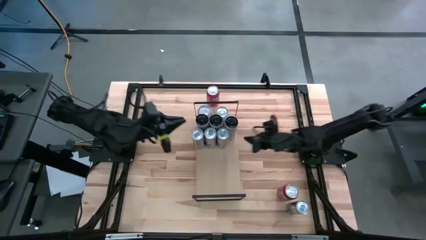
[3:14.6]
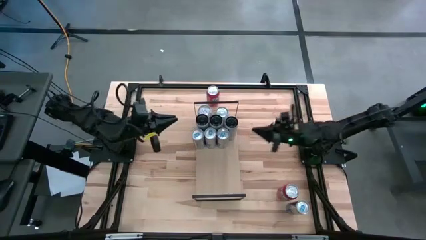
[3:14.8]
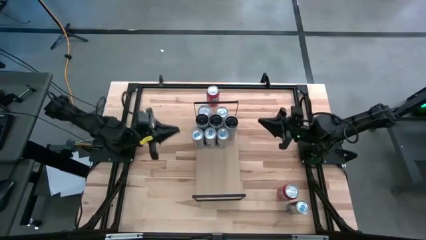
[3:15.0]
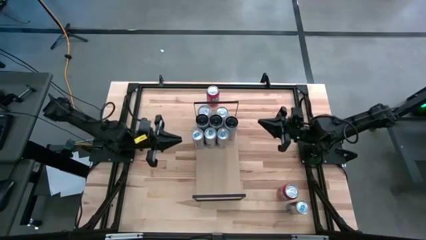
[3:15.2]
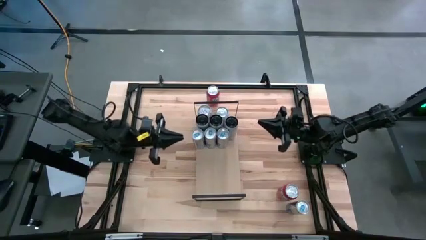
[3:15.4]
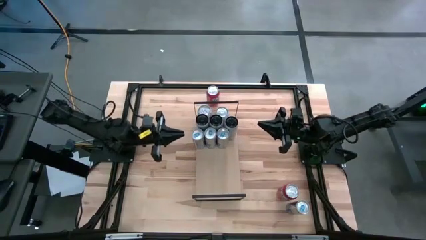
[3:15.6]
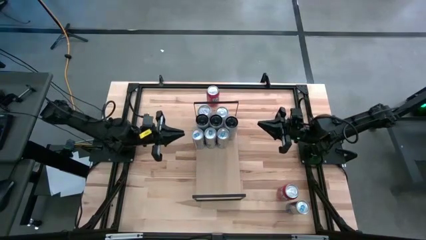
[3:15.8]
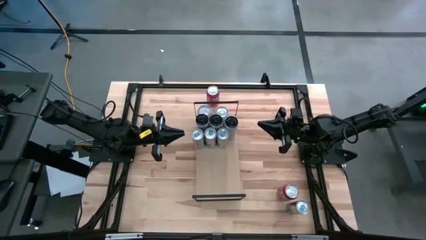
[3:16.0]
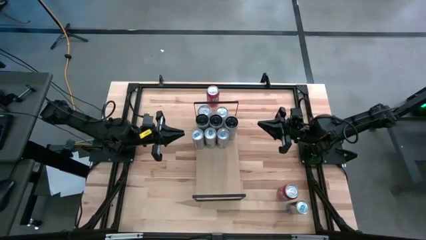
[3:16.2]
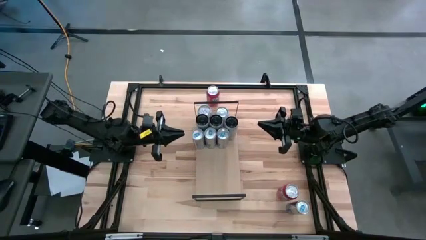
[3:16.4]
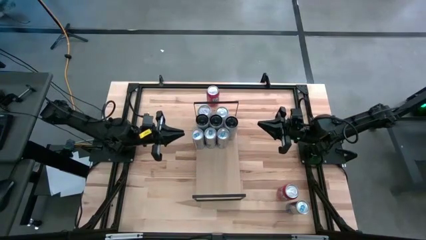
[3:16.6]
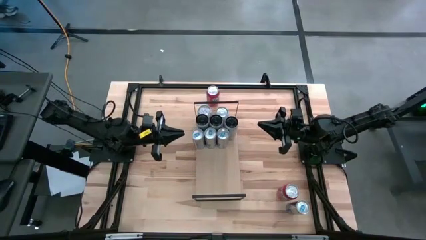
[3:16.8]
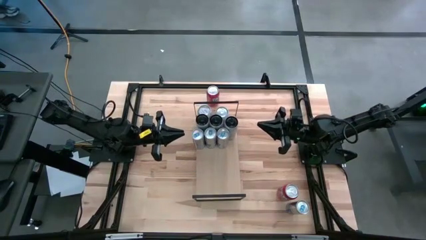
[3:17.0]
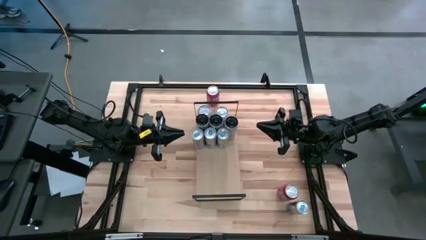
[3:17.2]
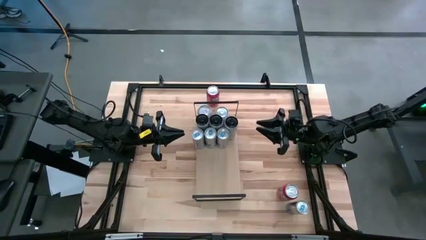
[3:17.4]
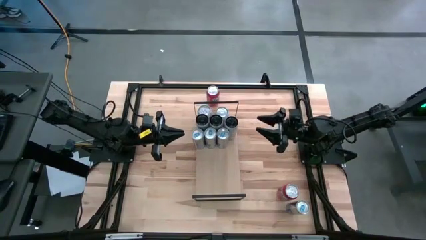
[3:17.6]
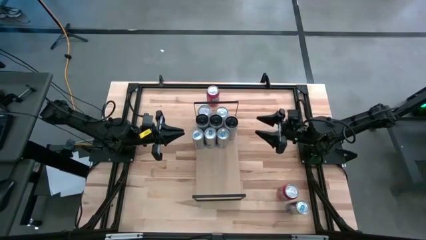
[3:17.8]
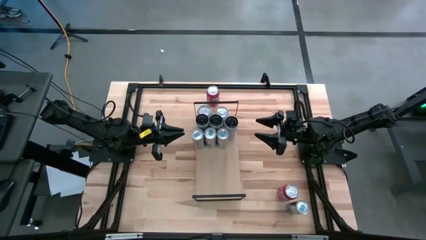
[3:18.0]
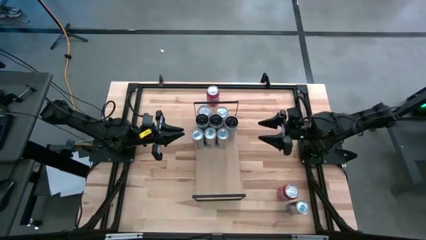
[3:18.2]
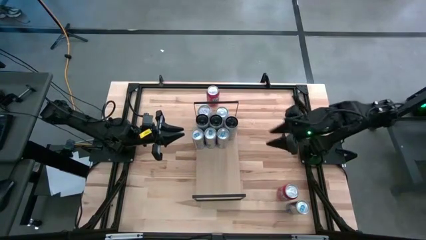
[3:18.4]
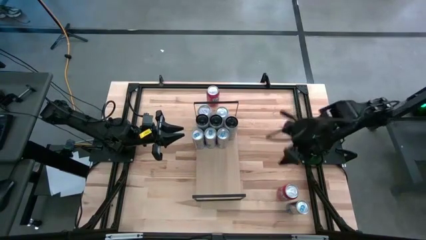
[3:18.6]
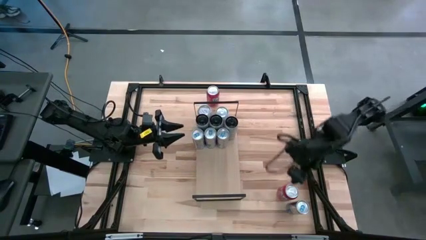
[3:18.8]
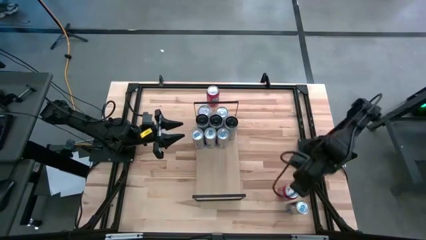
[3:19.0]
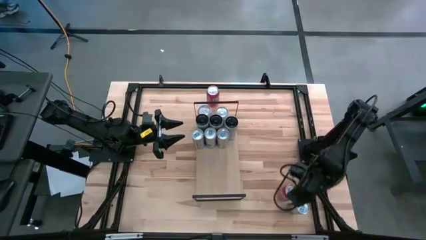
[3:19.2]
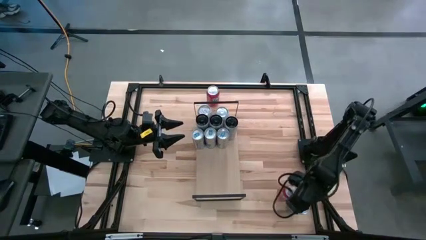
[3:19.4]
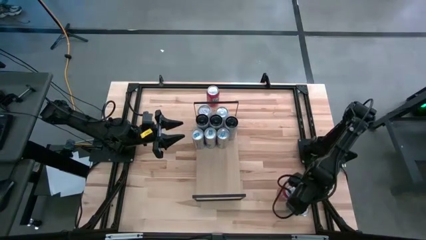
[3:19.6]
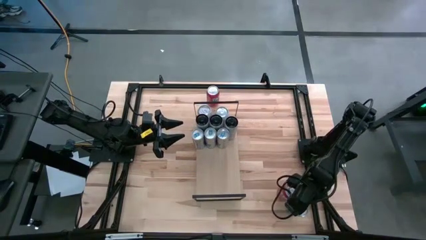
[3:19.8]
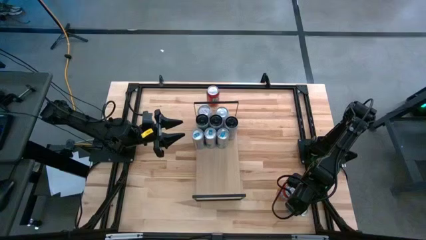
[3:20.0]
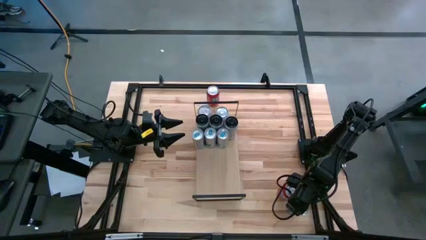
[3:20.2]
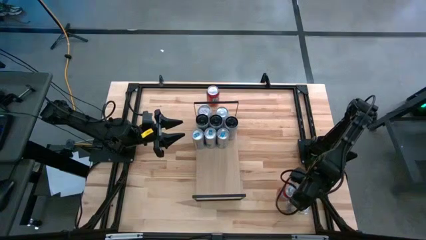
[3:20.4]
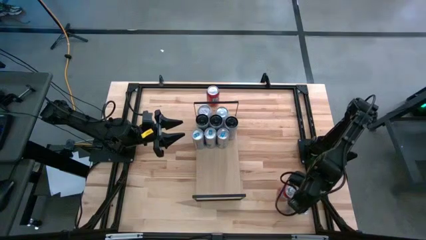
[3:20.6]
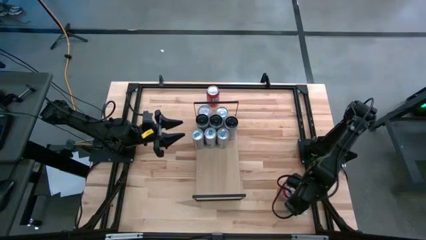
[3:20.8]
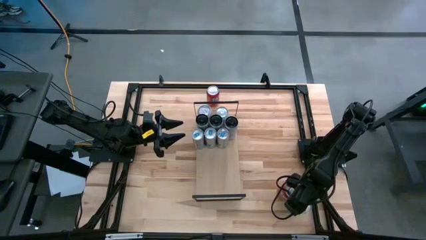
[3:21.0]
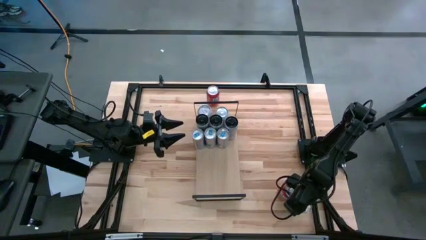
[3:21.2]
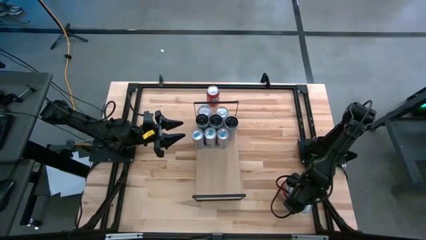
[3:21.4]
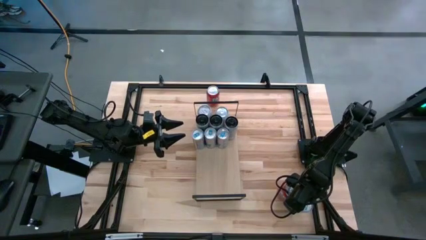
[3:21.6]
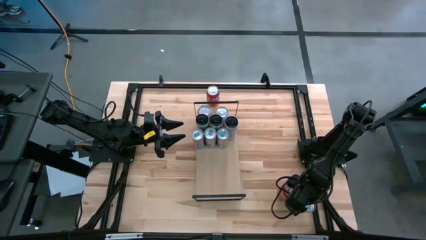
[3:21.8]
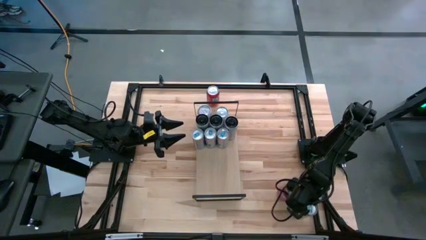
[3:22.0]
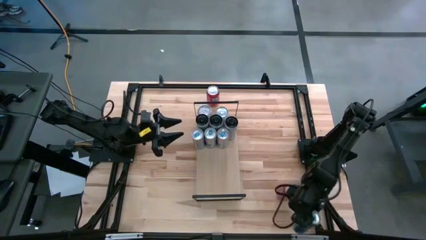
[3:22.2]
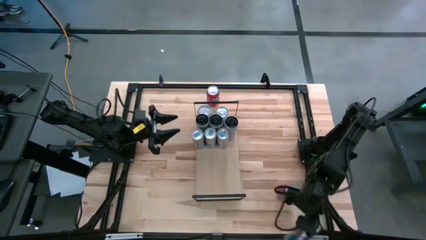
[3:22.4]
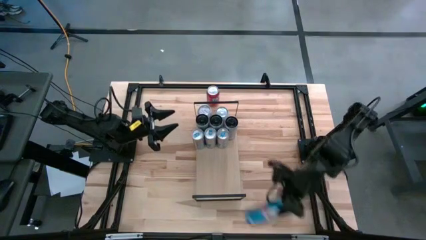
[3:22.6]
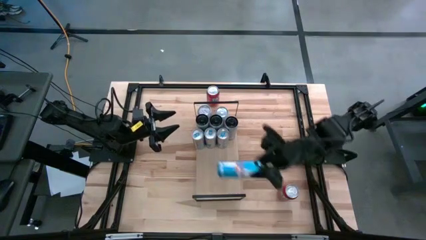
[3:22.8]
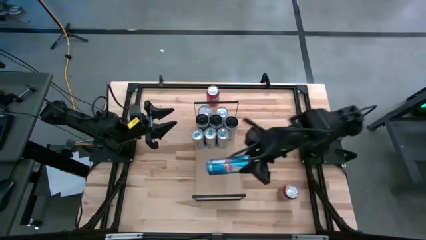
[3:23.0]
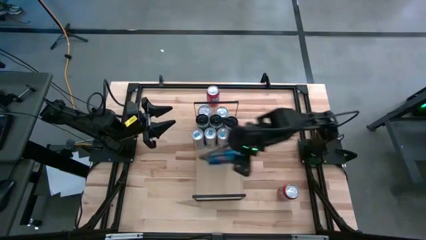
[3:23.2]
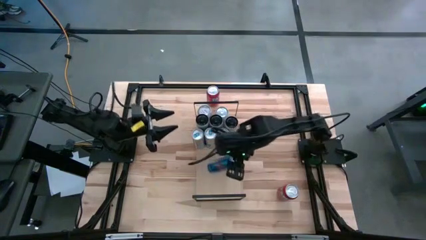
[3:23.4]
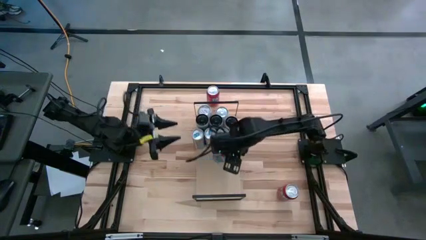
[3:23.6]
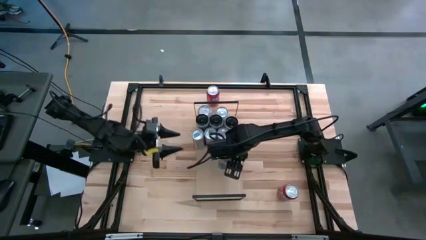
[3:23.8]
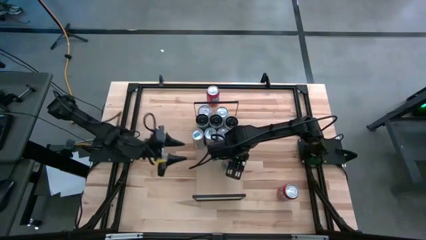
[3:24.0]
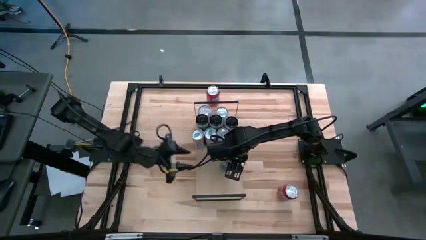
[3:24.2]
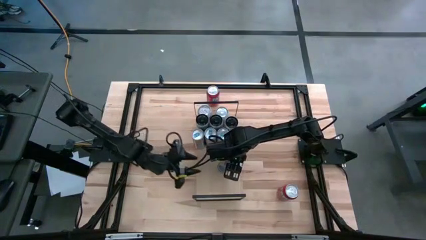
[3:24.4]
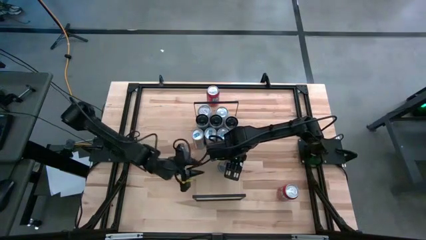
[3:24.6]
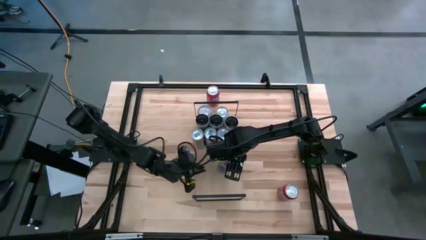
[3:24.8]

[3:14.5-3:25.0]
Task: Place canned beverage on shelf
Put the blue soda can on the shelf aligned with the other blue soda can

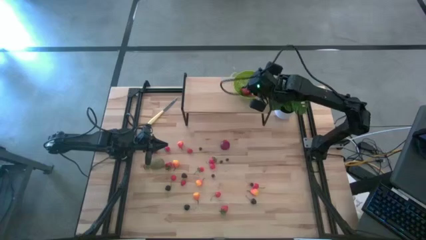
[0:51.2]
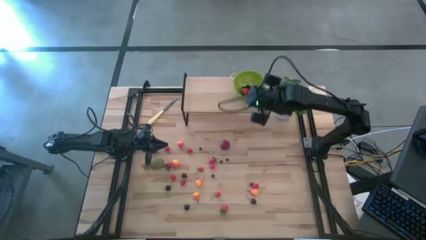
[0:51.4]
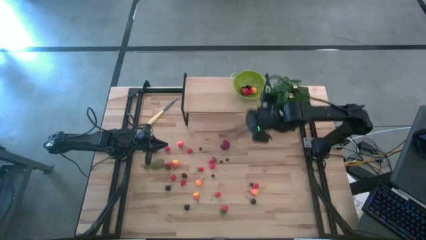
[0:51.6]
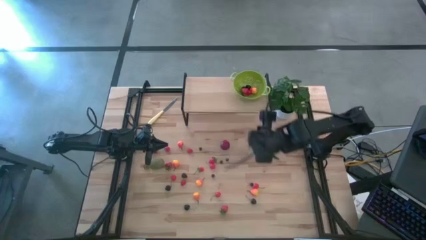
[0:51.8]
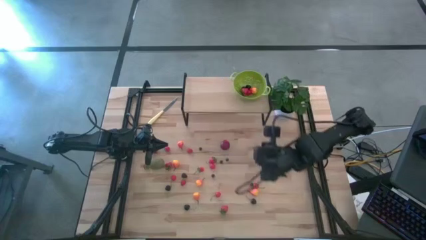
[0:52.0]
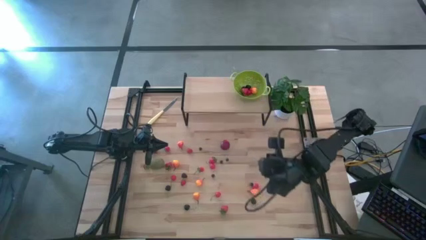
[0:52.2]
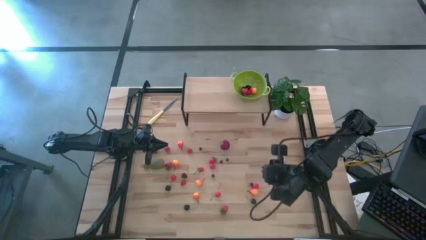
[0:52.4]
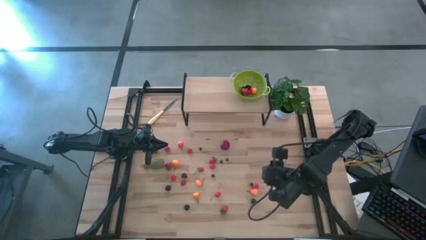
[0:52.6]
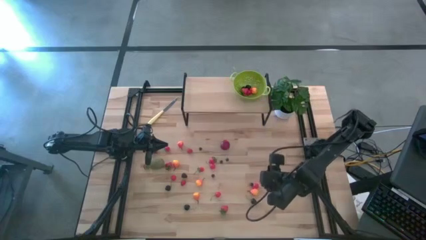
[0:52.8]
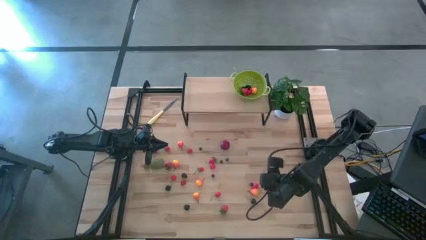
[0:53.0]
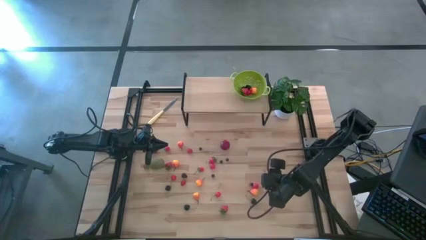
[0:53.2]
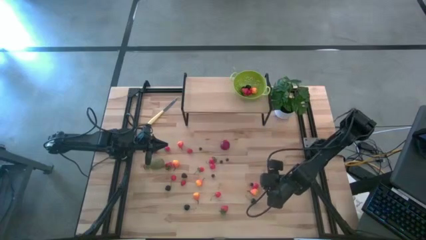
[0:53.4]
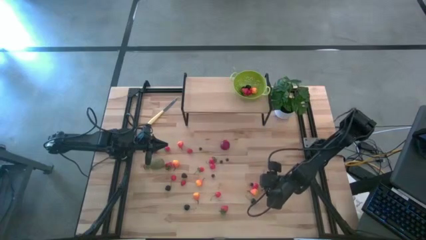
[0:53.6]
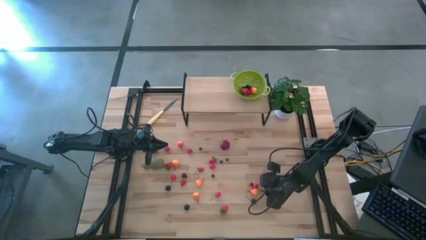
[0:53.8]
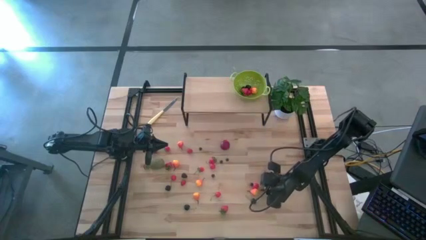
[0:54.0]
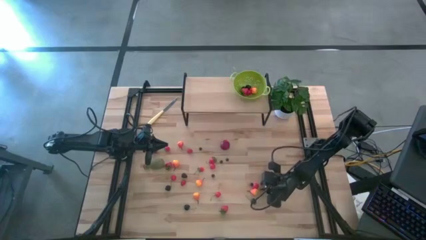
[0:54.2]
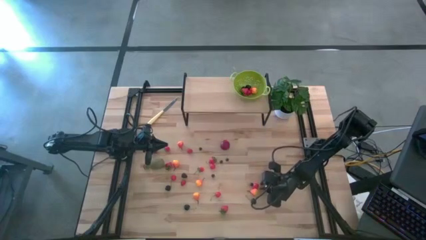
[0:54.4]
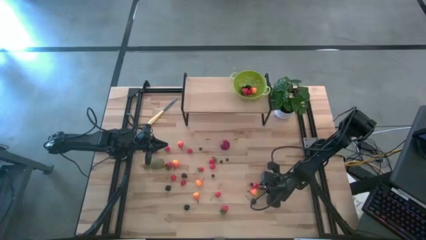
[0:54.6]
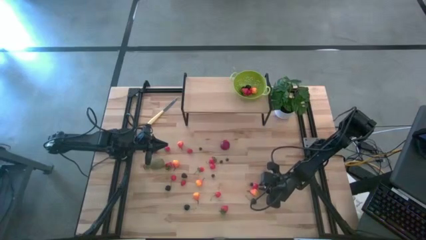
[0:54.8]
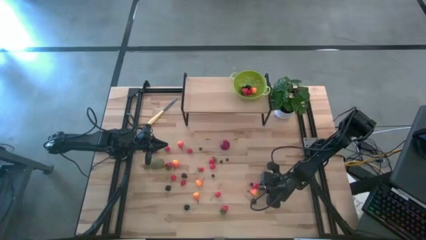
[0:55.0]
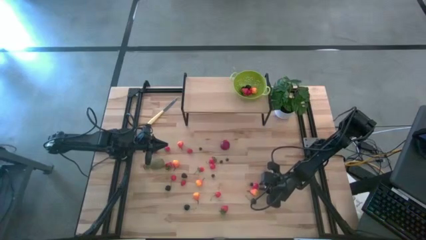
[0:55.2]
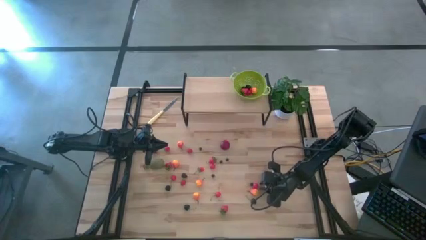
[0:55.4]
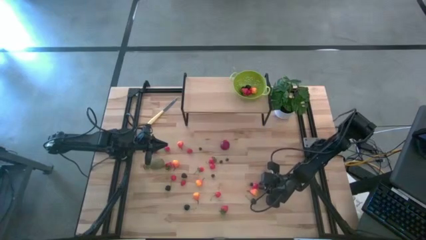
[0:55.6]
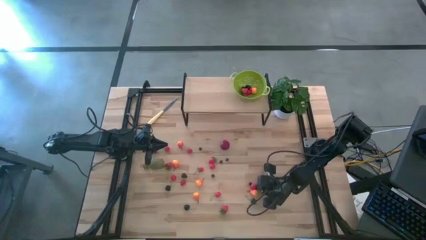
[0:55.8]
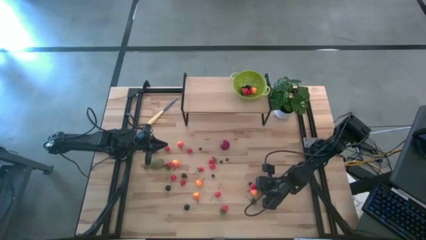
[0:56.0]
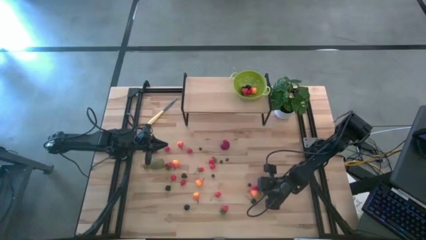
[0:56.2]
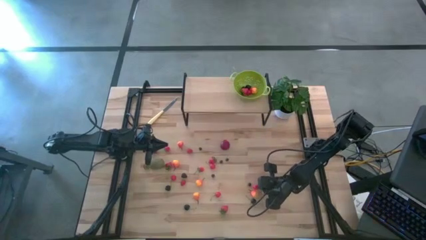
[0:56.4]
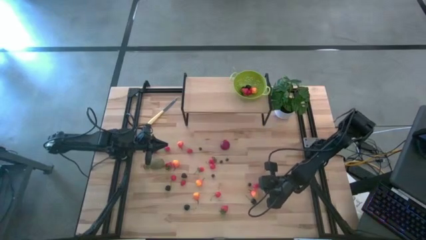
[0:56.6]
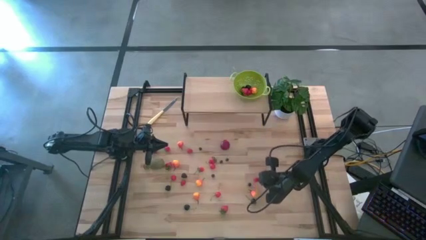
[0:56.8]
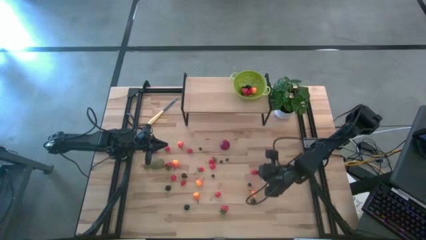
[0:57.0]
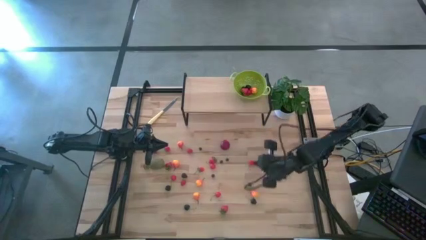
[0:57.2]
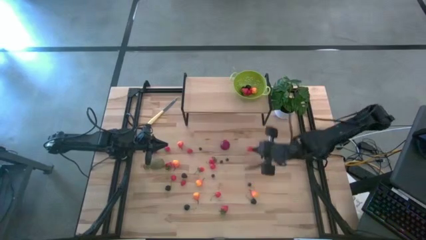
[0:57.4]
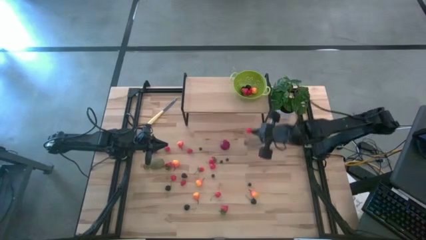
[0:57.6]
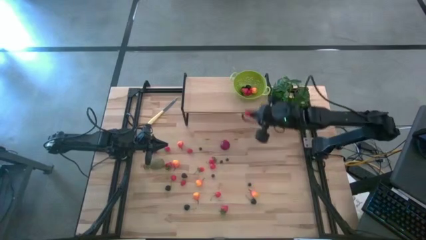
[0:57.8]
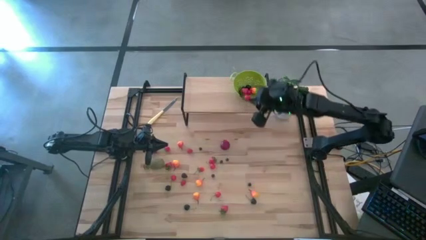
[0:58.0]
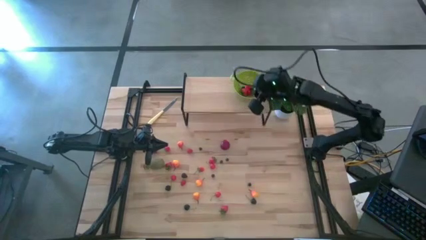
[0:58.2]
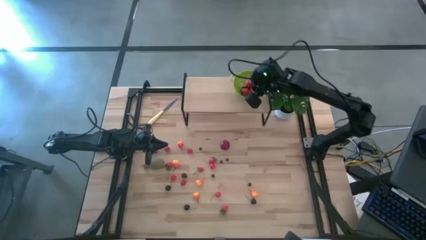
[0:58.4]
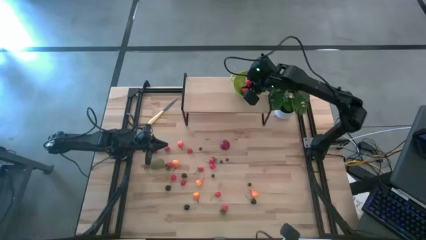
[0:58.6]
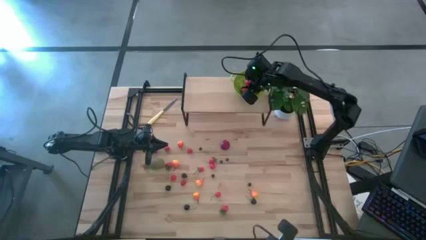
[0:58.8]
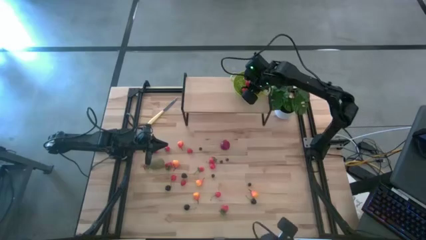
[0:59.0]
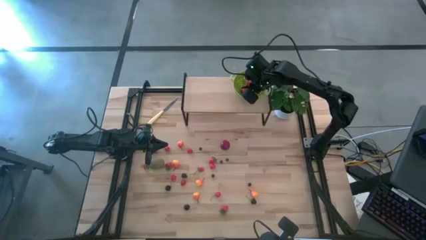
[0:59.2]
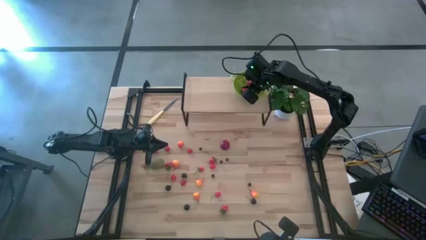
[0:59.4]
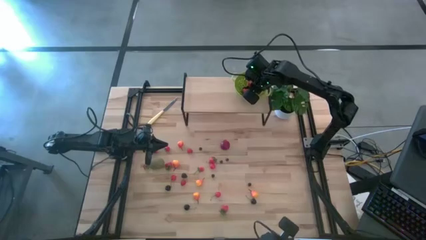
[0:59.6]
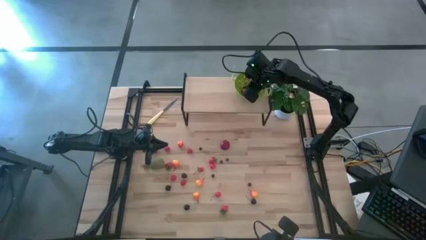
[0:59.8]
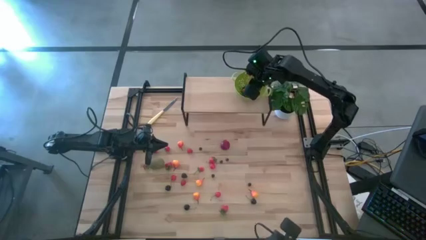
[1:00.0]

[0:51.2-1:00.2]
Task: Build produce basket
Put the red cherry into the green basket
